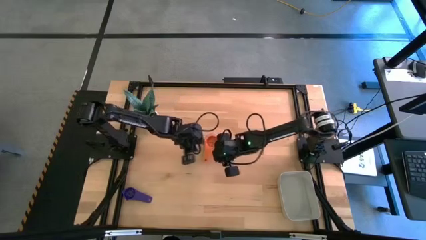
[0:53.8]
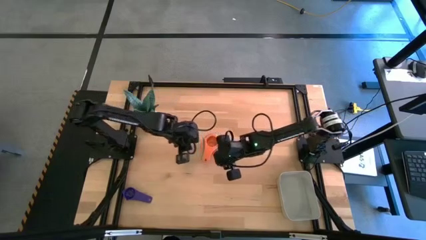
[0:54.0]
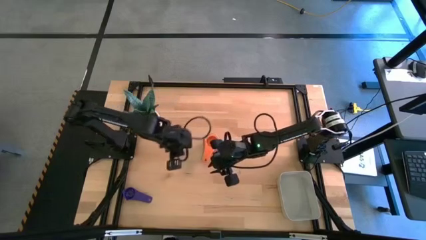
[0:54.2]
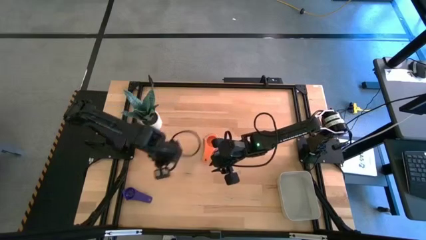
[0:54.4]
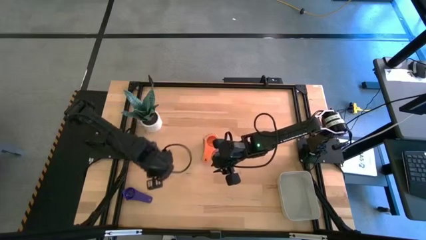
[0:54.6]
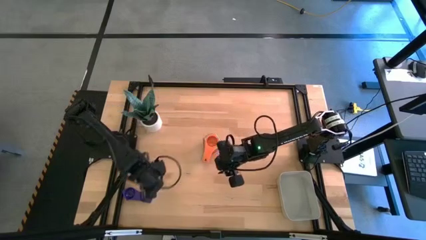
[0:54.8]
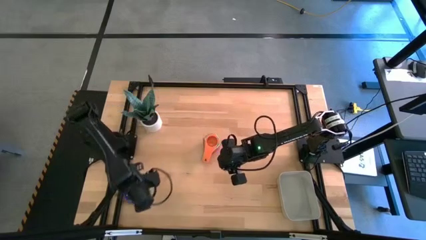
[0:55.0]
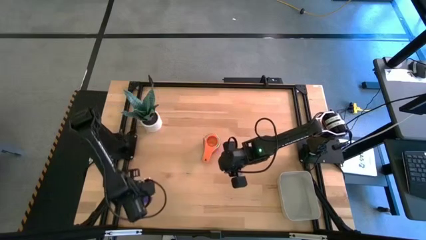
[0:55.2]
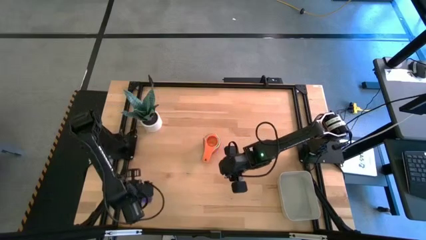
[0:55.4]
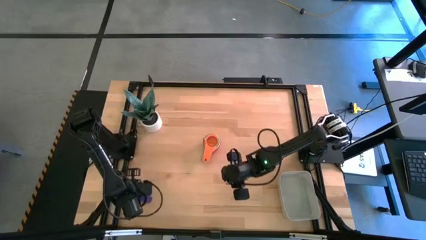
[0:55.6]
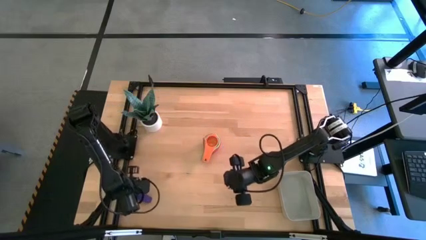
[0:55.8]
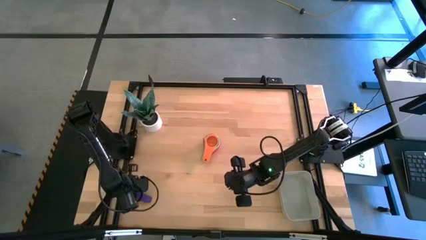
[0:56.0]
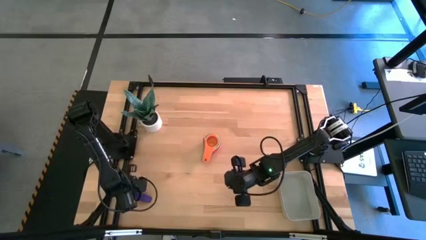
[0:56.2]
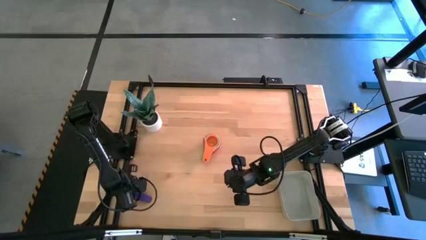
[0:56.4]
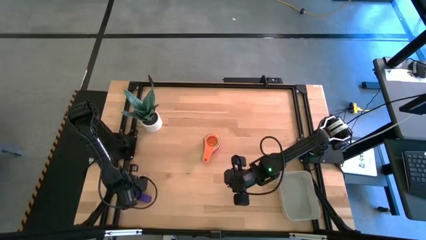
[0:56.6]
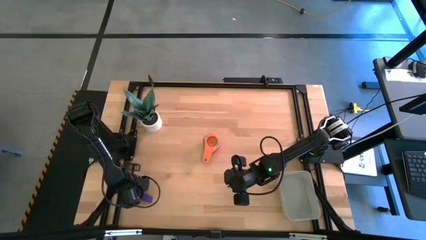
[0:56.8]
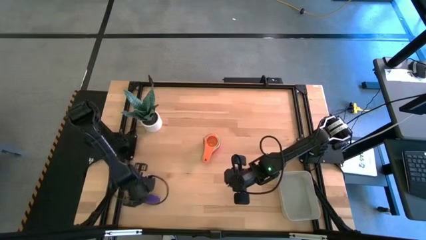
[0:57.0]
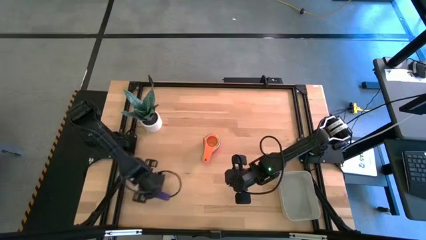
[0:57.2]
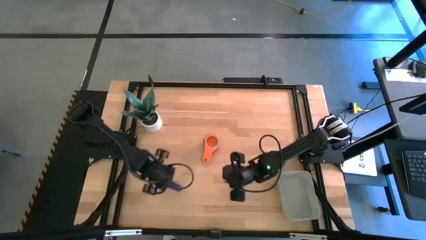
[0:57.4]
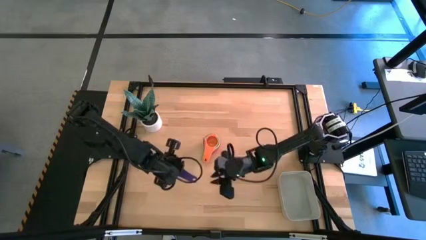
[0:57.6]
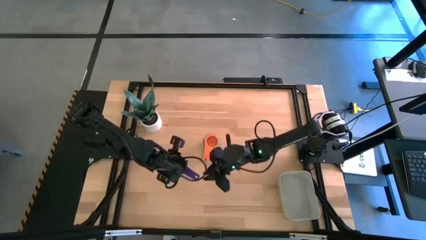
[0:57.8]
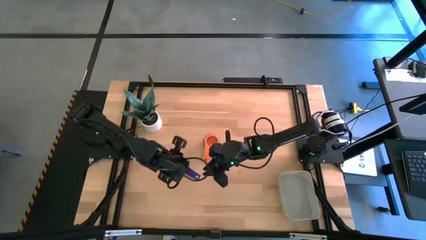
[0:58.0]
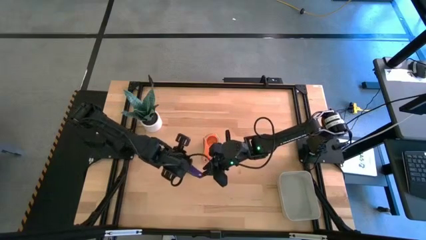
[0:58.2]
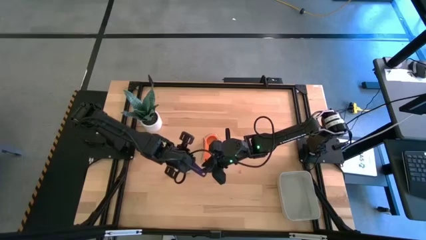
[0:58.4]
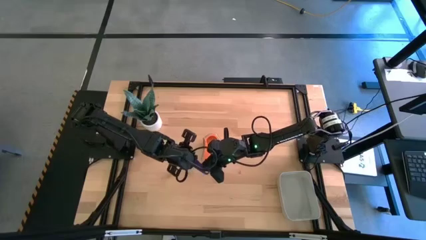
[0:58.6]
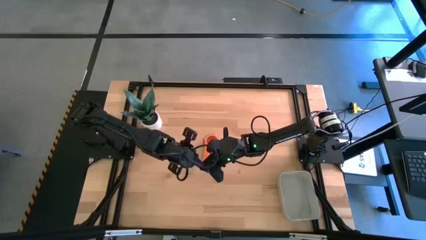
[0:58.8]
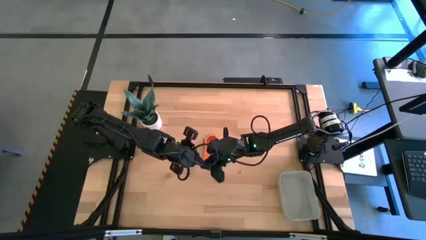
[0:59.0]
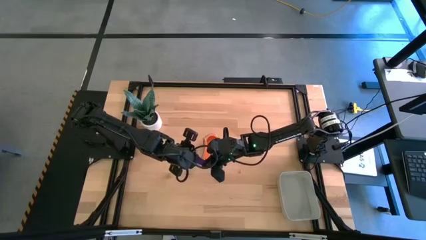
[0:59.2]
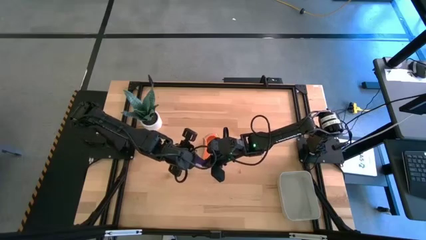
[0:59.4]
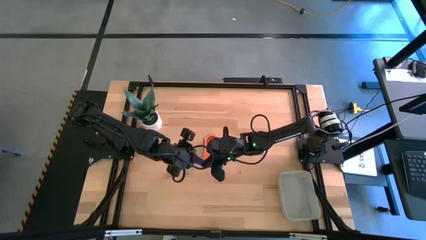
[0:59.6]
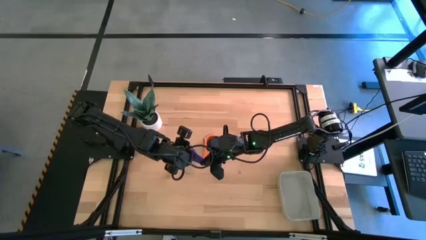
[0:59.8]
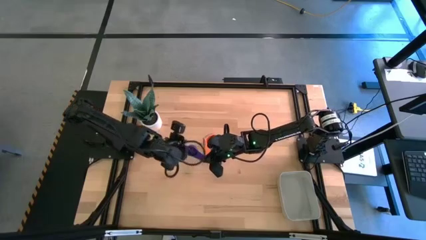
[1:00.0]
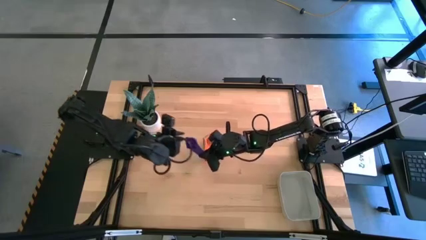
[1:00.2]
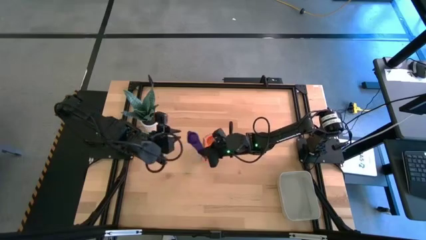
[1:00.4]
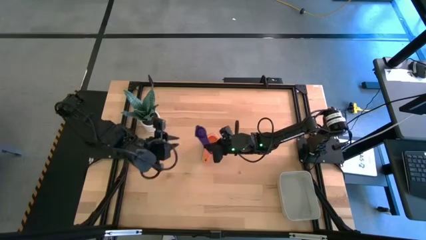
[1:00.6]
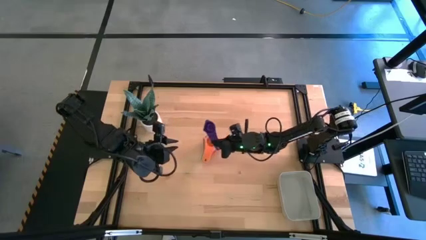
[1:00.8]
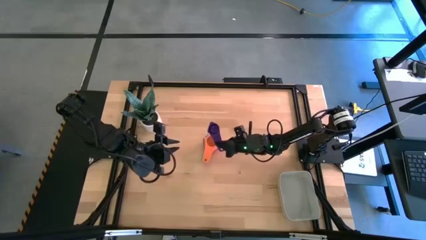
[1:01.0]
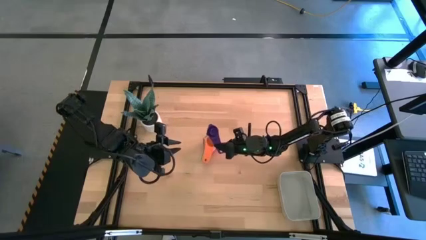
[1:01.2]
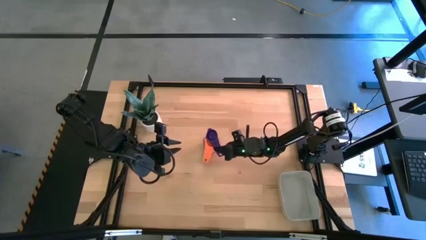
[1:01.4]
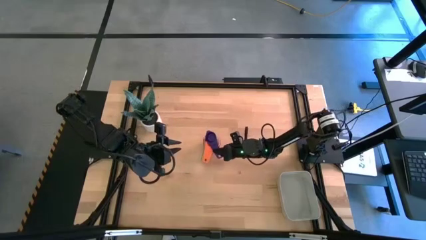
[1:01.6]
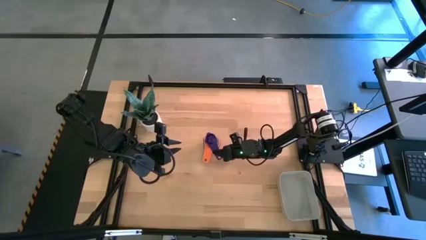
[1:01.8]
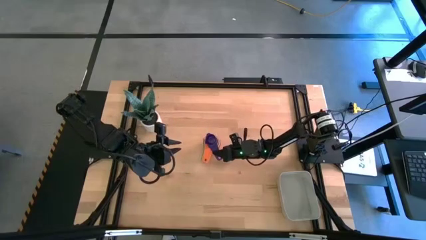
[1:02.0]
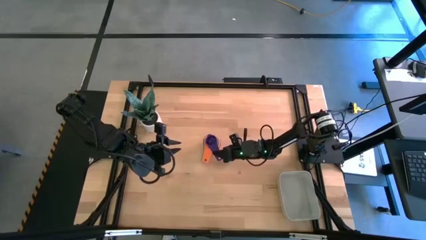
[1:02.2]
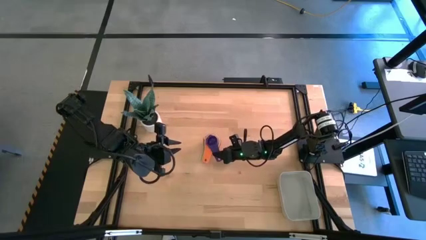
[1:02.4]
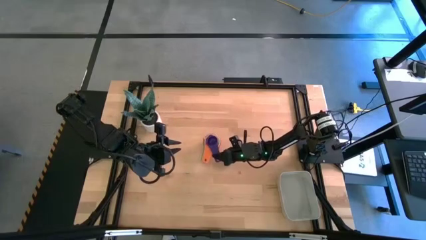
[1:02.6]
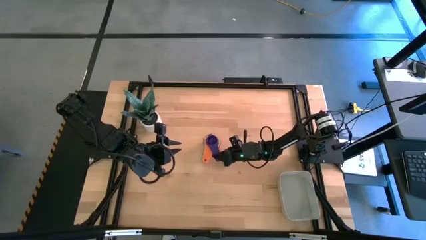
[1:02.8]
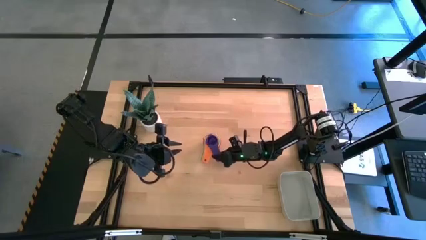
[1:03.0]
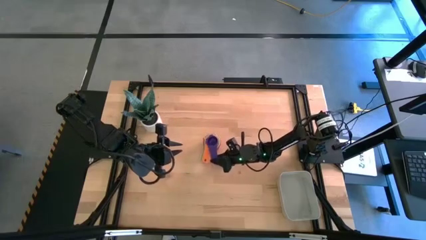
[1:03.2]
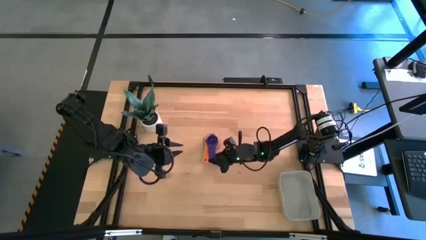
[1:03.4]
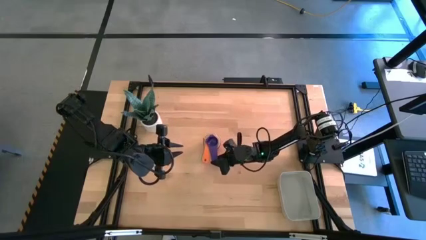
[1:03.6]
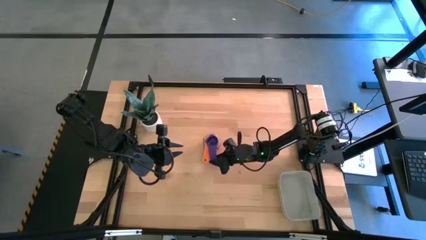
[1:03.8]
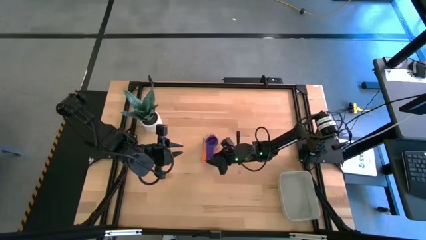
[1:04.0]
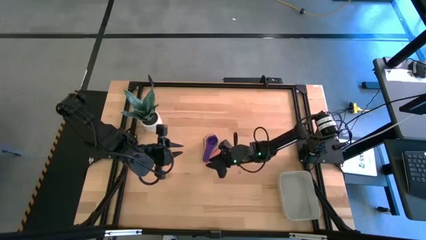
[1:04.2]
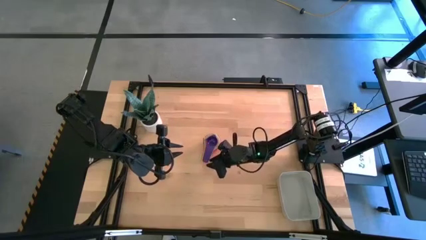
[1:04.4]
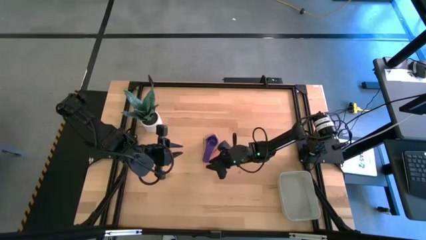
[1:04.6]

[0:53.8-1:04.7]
Task: Nest measuring cups in basket
Stack the violet measuring cup on top of the orange measuring cup

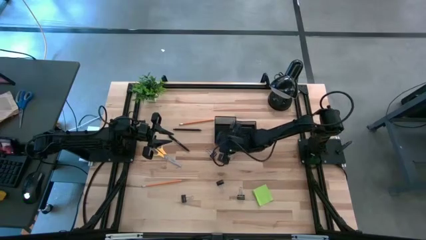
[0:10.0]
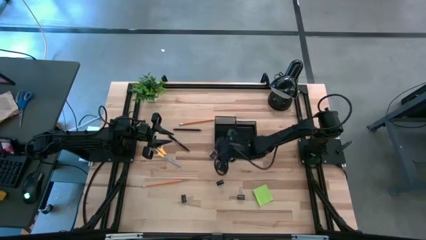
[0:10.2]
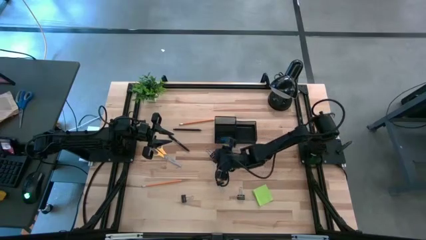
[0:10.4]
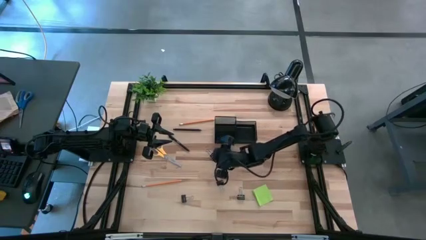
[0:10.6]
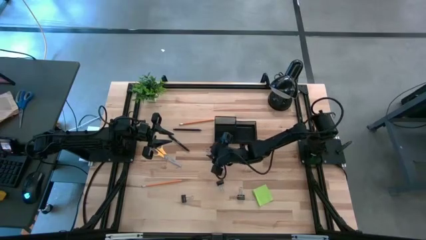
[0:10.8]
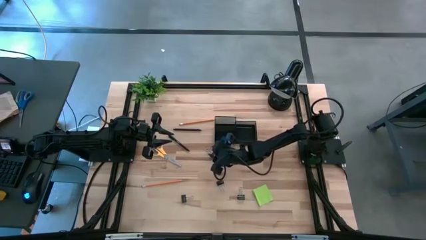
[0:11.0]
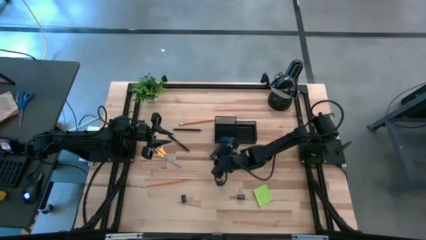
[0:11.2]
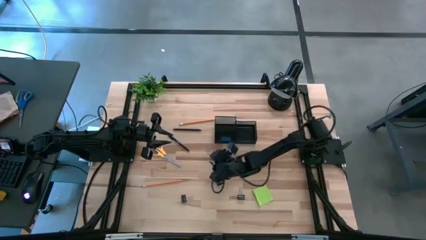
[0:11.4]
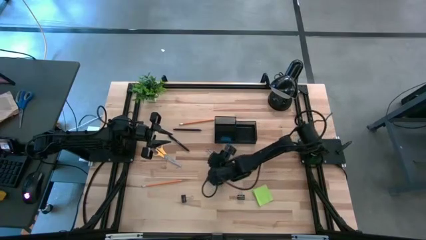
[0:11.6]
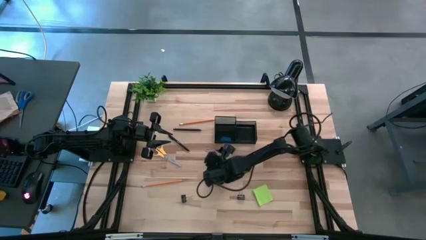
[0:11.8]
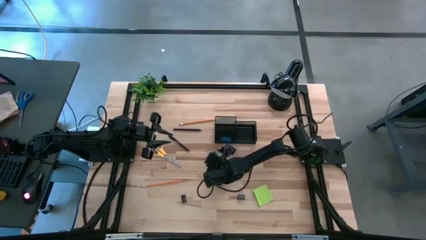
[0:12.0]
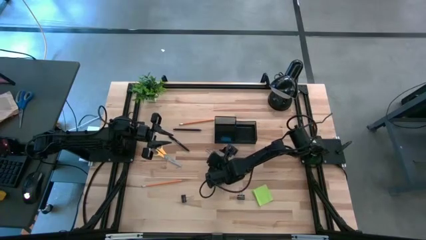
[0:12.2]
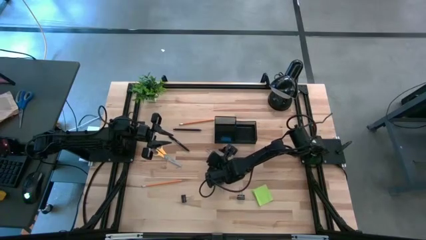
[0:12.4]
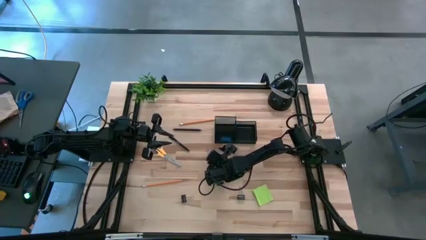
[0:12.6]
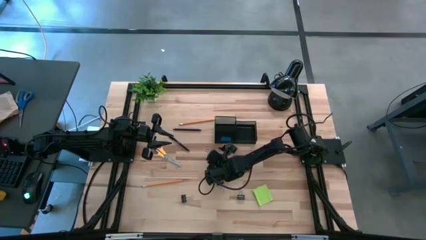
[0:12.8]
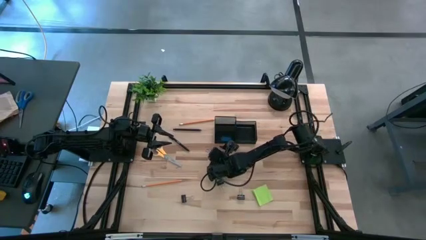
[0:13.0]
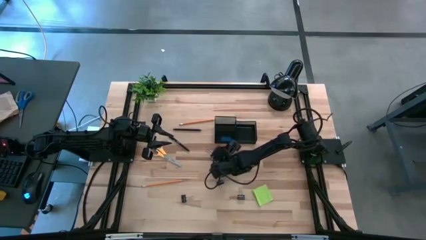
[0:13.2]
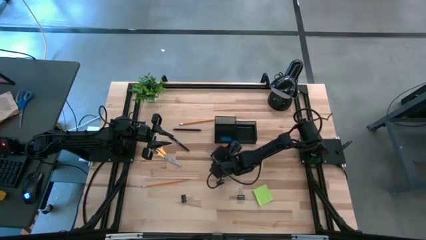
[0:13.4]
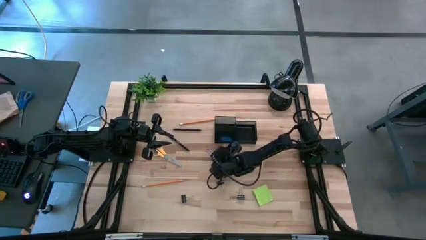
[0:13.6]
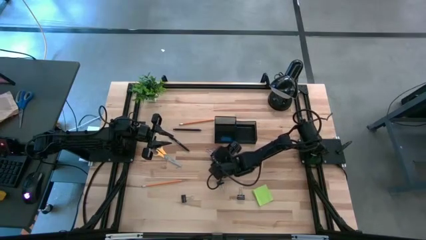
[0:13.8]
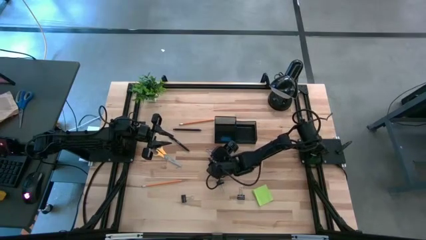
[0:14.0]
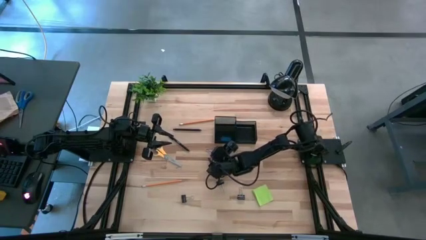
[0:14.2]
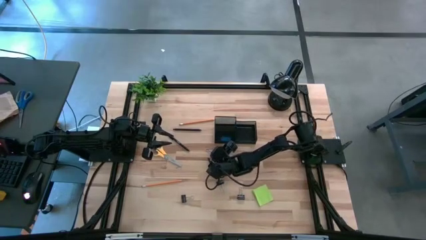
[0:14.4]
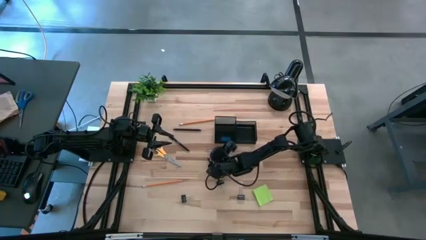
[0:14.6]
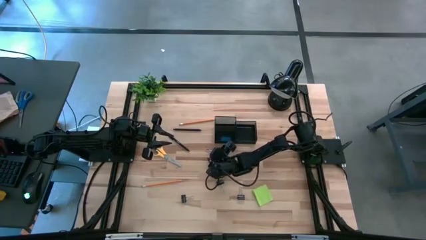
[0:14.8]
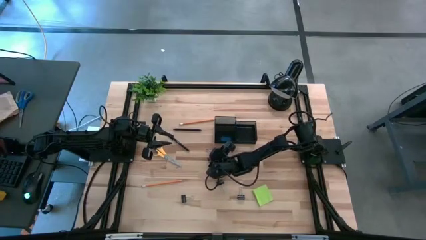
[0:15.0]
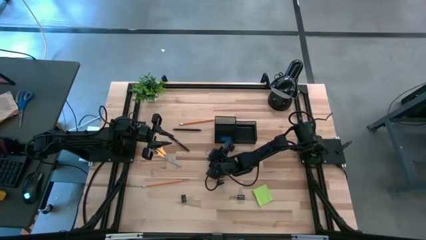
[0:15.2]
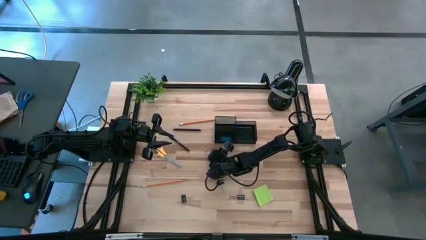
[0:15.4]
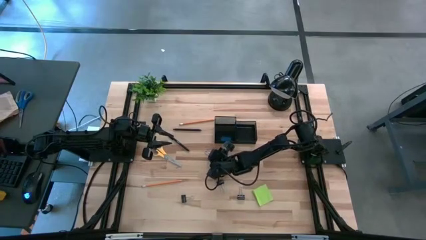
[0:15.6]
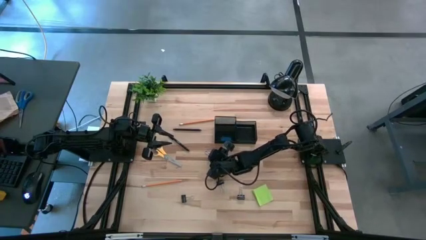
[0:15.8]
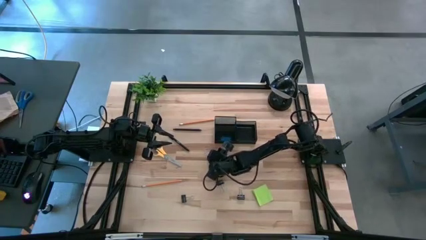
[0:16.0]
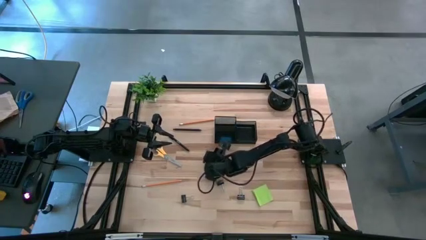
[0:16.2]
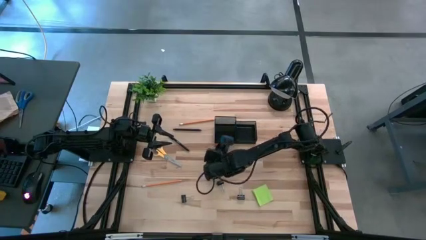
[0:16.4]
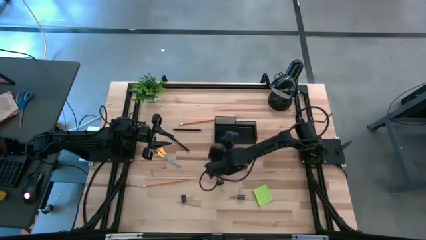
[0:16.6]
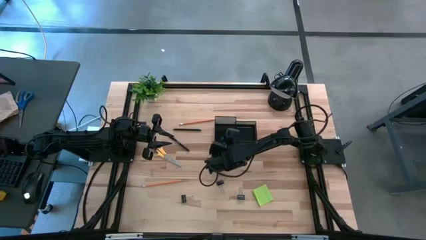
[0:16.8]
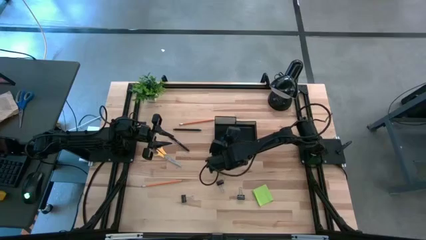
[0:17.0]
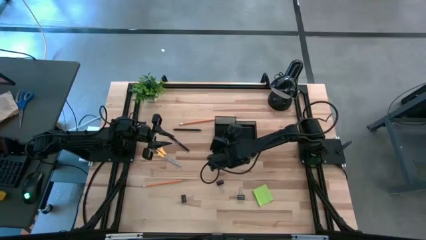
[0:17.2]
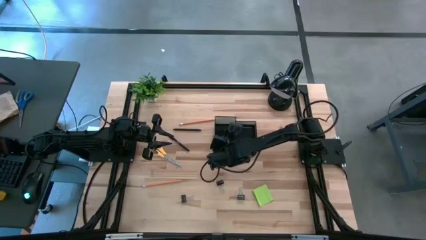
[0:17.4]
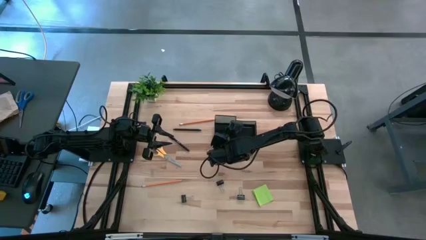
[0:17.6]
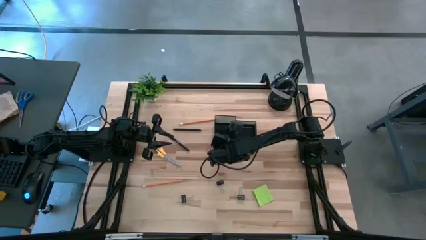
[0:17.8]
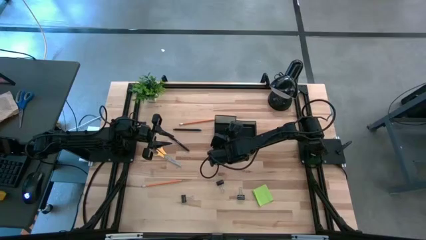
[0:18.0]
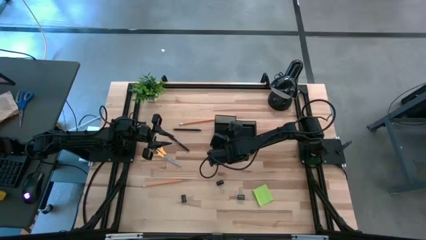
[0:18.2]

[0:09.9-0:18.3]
Task: Pick and place office supplies into organizer
Put the black binder clip into the desk organizer
